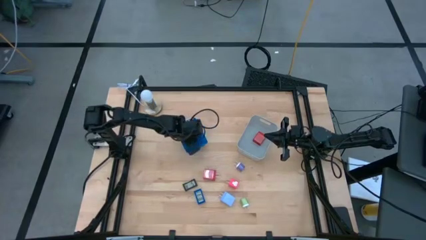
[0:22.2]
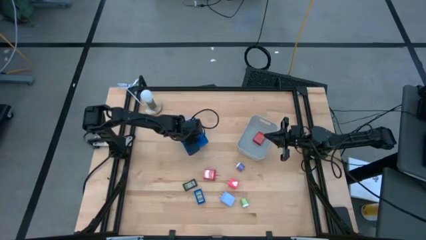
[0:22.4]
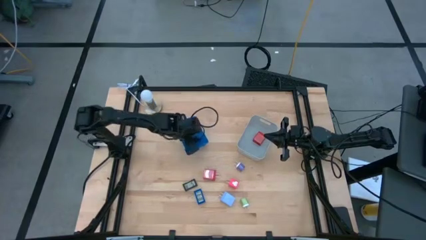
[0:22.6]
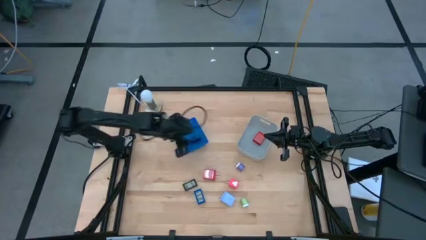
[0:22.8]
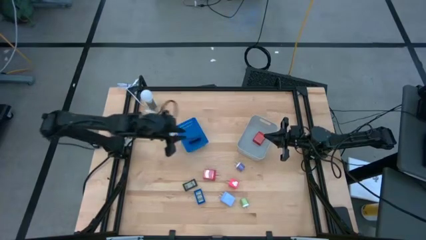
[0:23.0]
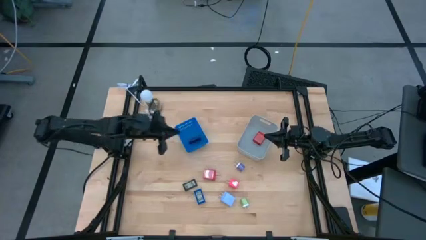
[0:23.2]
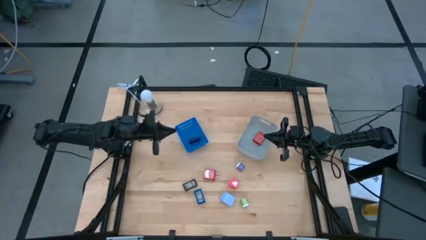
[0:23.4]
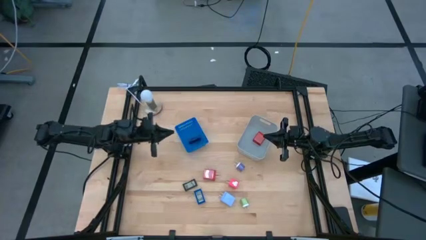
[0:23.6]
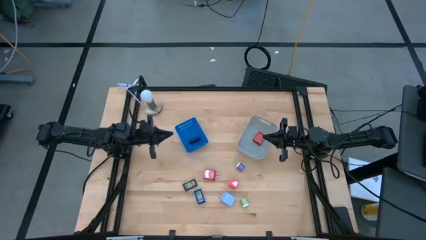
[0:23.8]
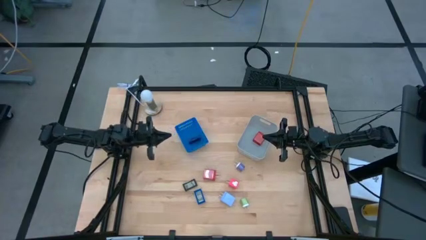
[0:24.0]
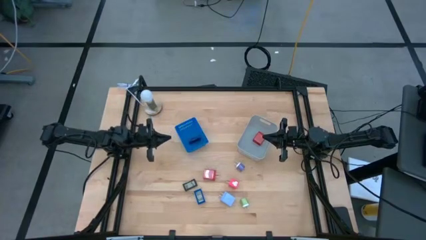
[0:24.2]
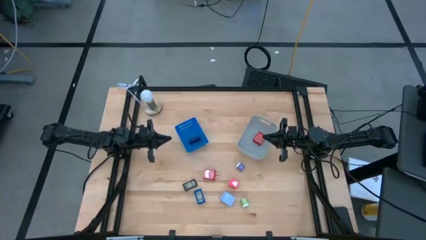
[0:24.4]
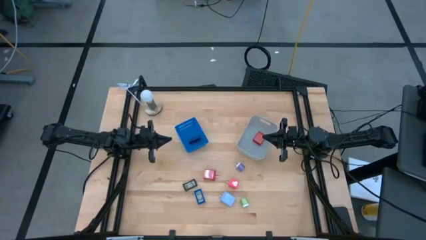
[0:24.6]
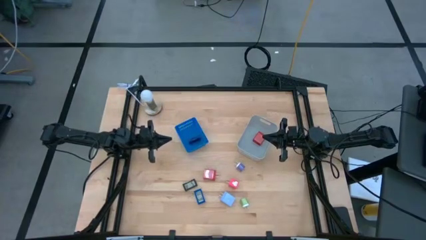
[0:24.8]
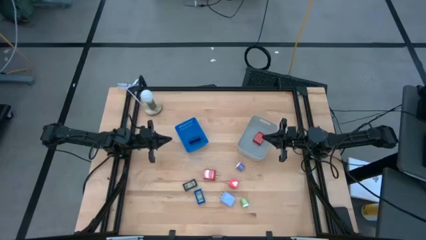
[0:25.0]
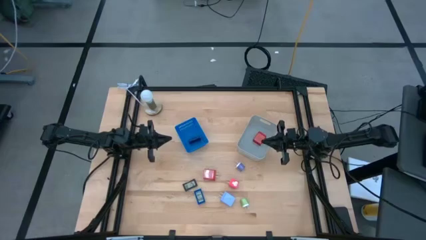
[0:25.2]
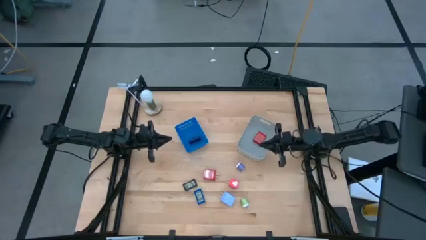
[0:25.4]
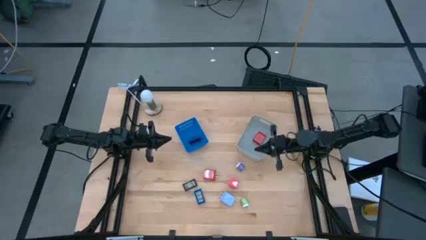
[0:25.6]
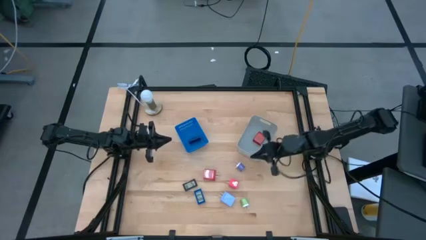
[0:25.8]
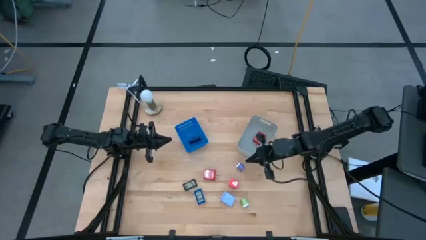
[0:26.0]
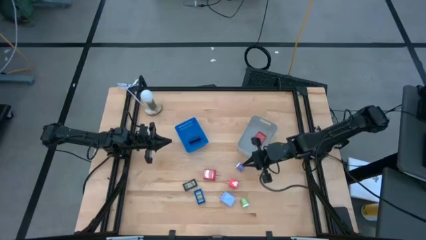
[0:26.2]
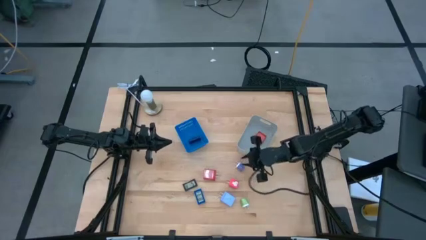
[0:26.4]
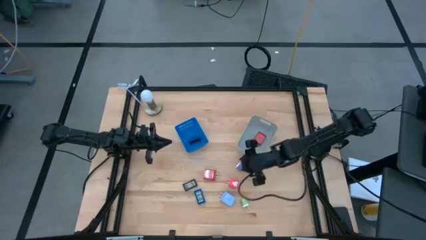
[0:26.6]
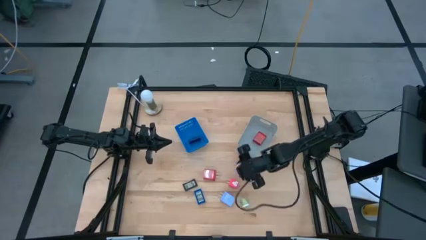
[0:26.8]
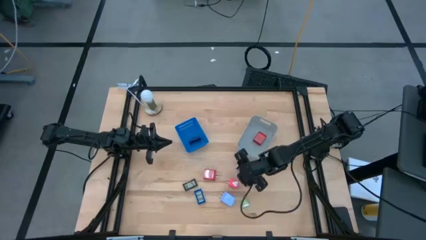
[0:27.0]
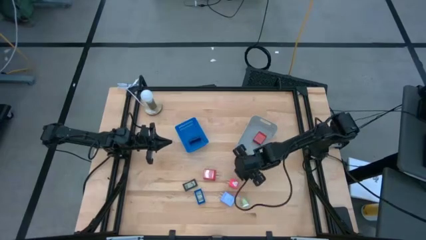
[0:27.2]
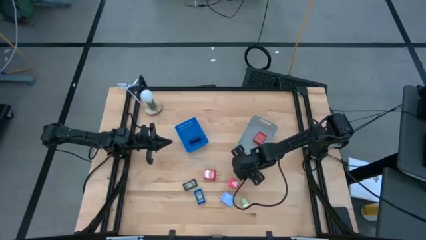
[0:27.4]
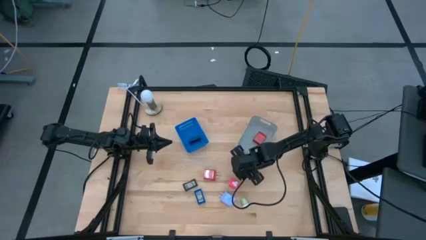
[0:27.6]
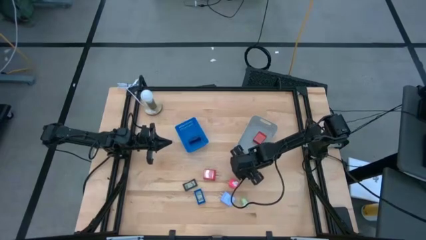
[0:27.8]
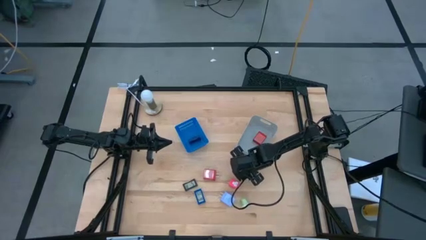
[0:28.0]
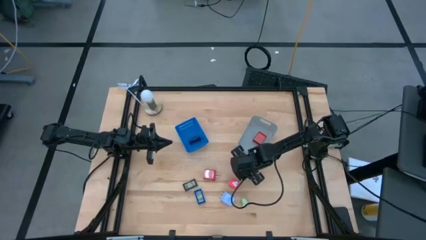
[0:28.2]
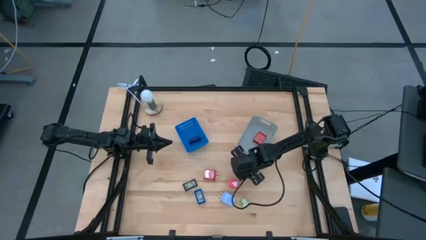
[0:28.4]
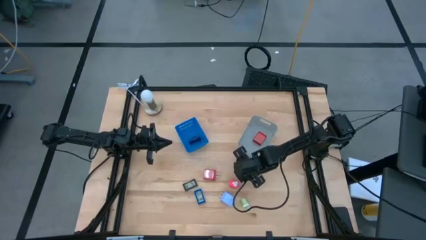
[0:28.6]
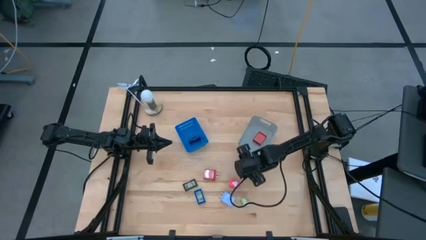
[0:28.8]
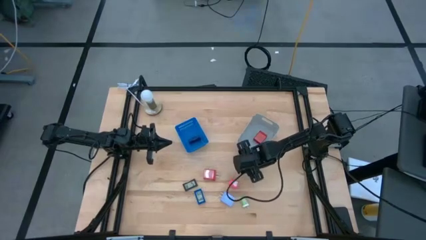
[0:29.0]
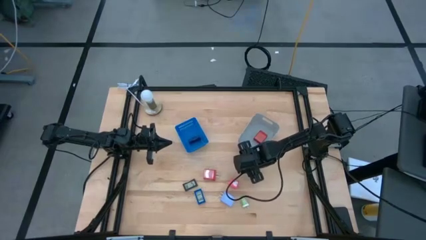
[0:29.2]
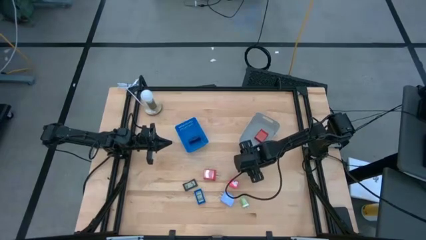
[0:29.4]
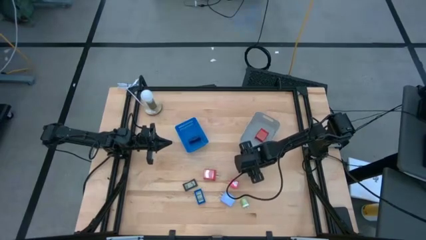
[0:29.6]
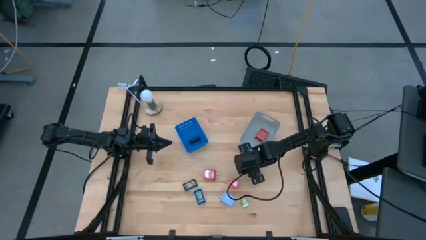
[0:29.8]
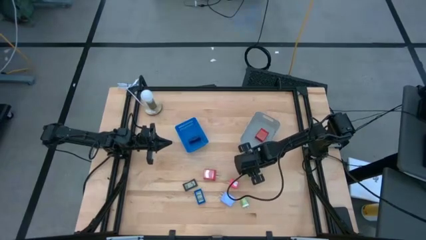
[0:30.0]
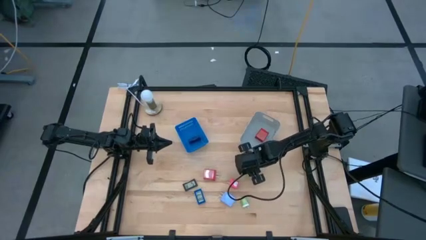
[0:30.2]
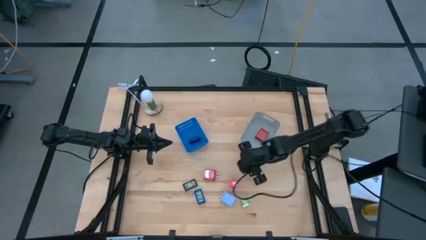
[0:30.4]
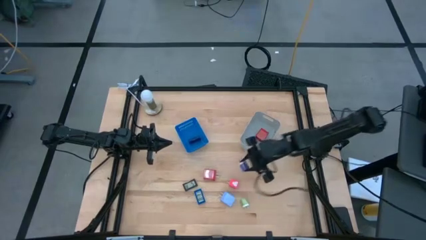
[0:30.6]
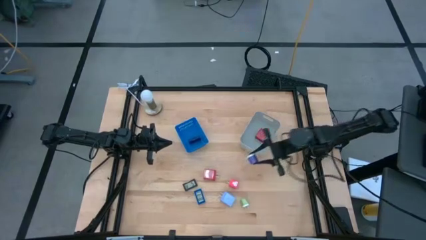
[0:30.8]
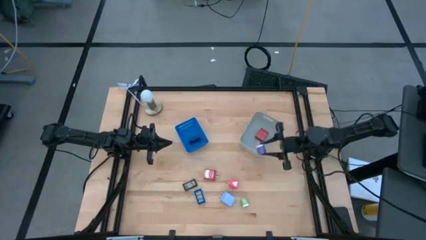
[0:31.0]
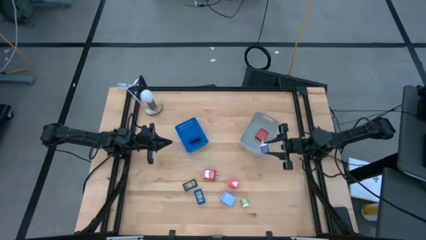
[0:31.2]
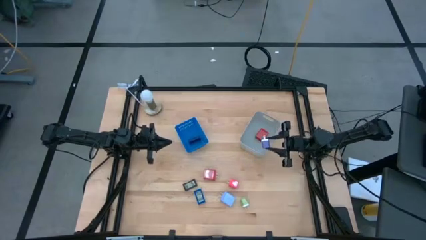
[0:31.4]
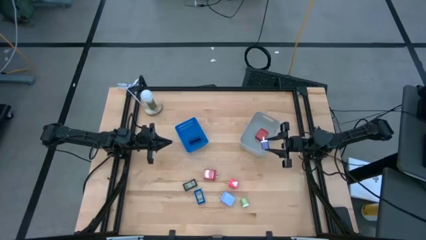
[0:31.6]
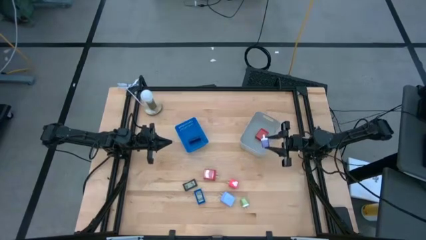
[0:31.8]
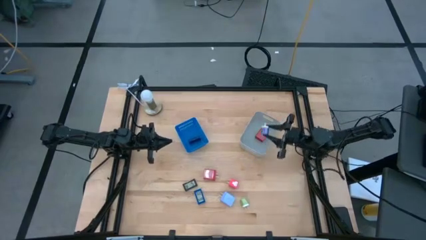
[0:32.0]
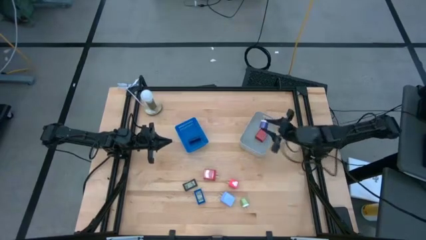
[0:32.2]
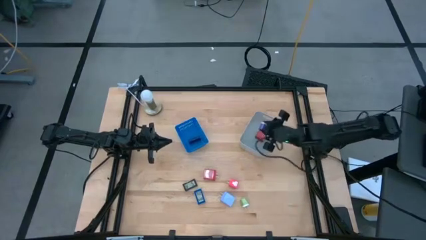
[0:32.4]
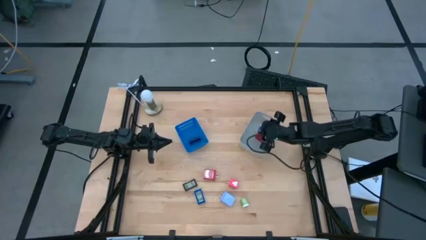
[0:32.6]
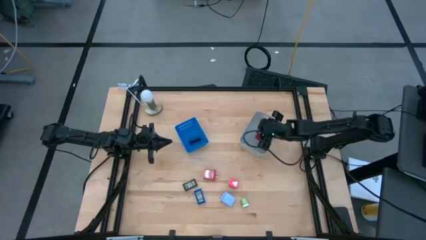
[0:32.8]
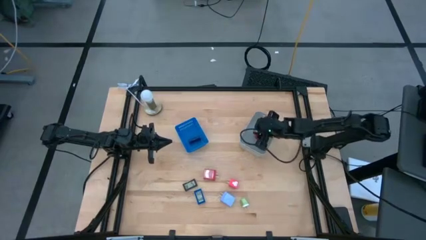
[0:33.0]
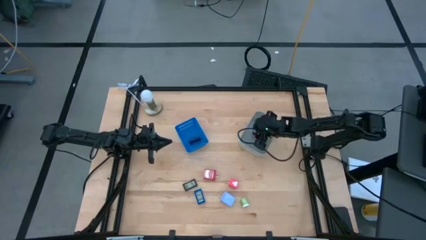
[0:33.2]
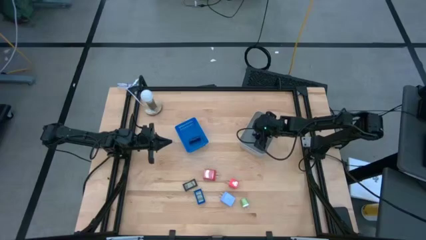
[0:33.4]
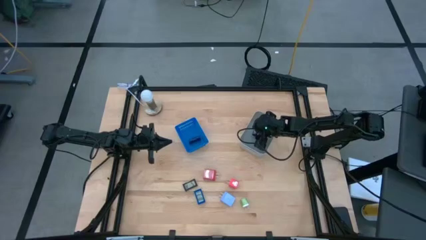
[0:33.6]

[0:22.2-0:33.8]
Task: Pick & Place Office items
Put the violet charger adapter into the gray bin

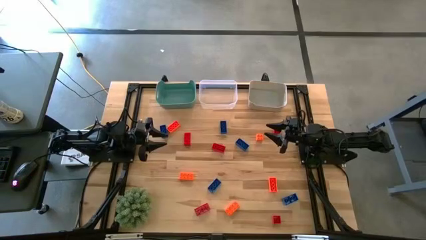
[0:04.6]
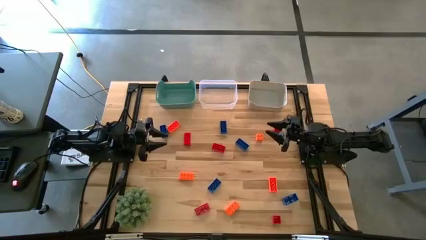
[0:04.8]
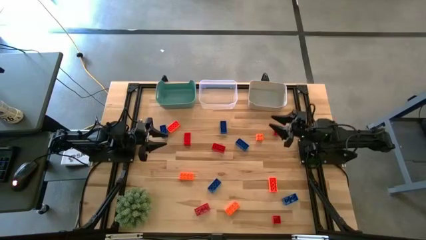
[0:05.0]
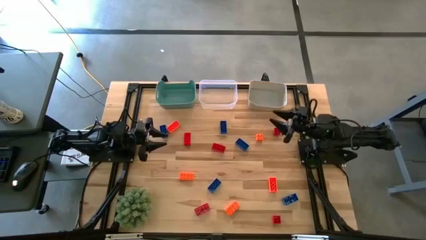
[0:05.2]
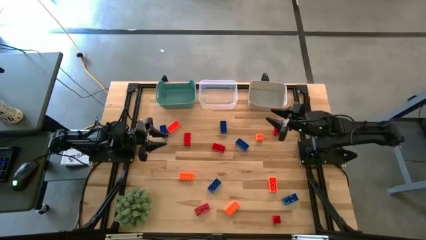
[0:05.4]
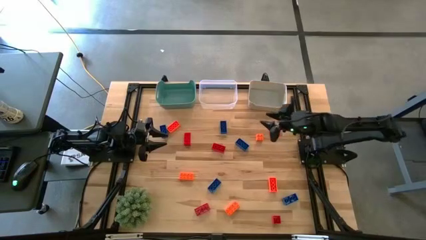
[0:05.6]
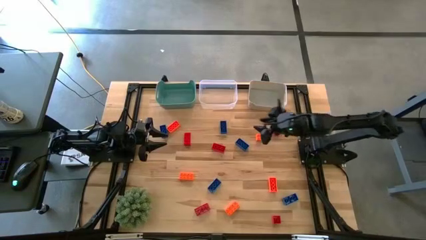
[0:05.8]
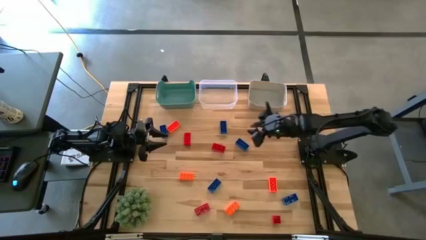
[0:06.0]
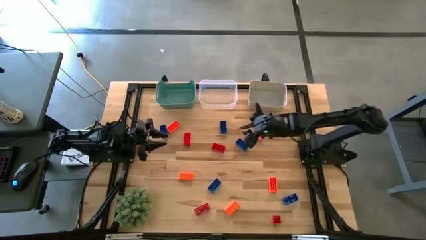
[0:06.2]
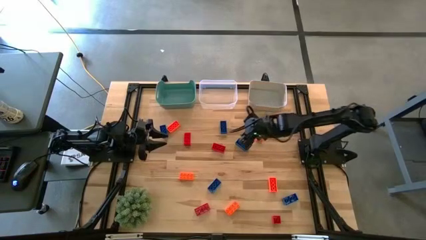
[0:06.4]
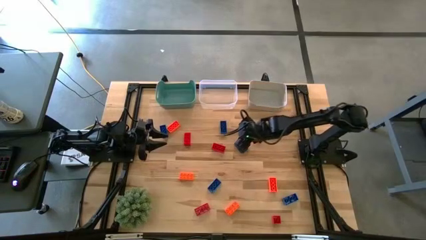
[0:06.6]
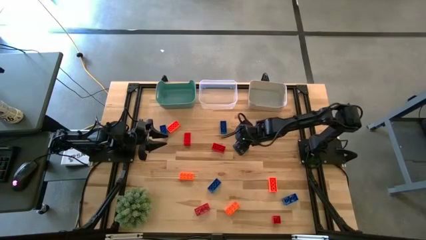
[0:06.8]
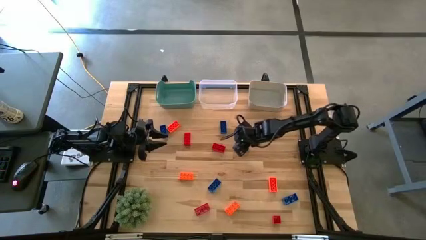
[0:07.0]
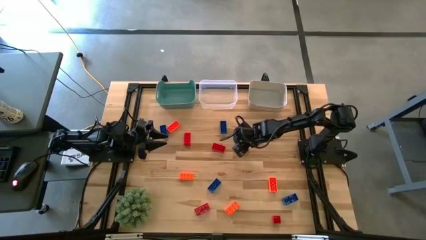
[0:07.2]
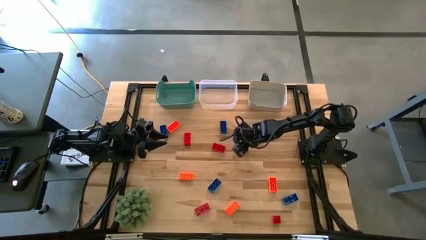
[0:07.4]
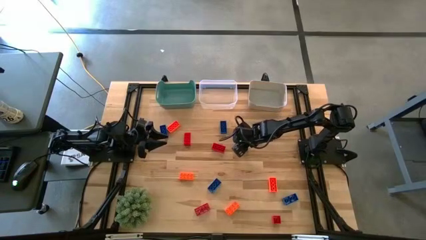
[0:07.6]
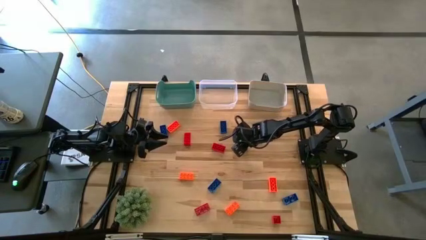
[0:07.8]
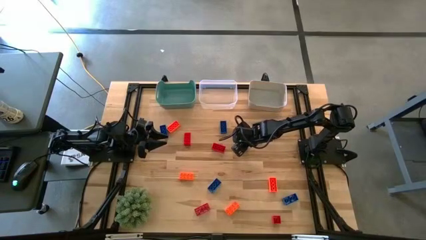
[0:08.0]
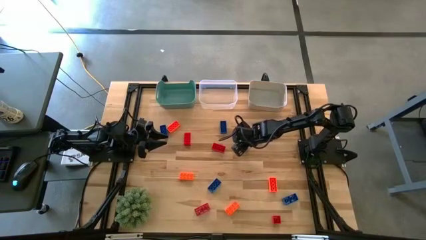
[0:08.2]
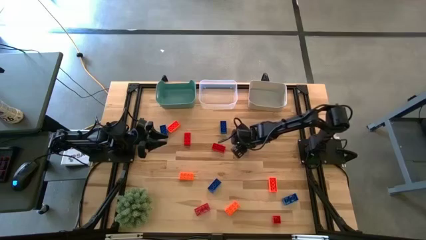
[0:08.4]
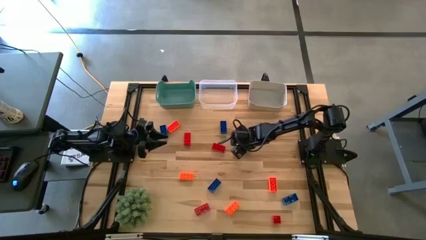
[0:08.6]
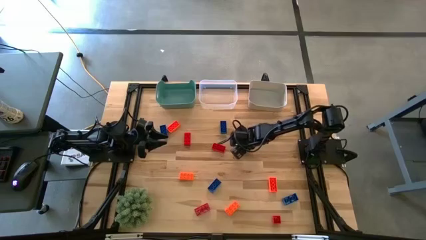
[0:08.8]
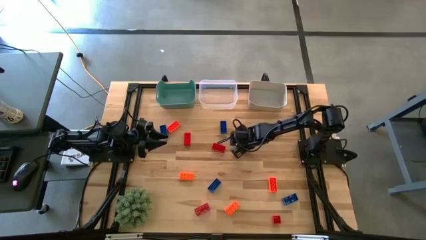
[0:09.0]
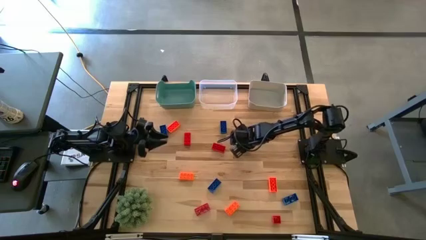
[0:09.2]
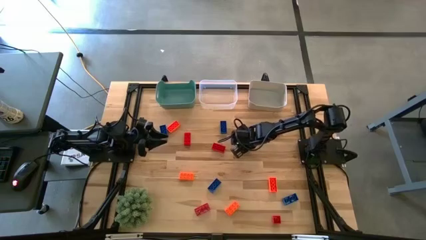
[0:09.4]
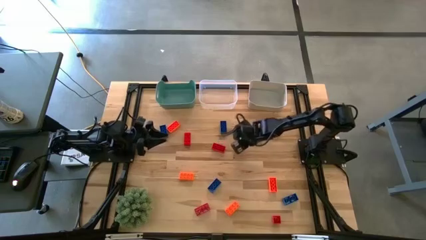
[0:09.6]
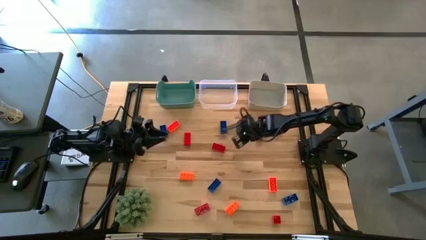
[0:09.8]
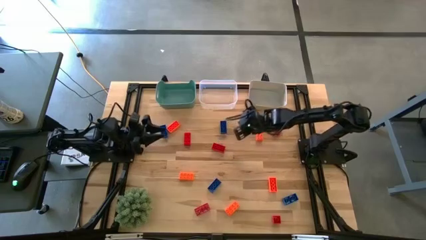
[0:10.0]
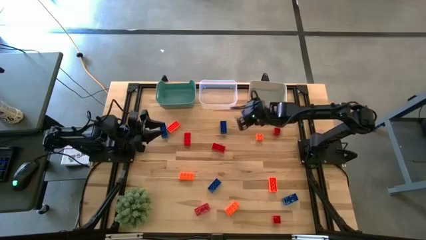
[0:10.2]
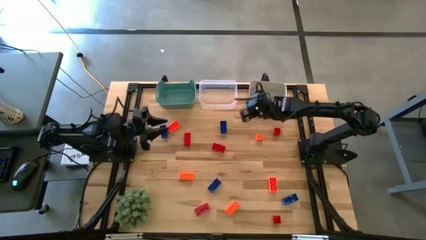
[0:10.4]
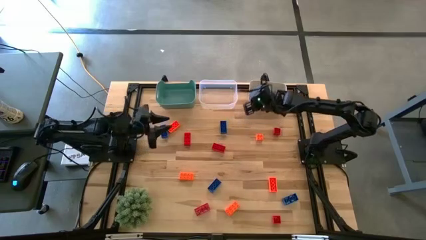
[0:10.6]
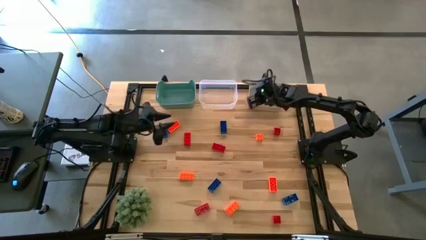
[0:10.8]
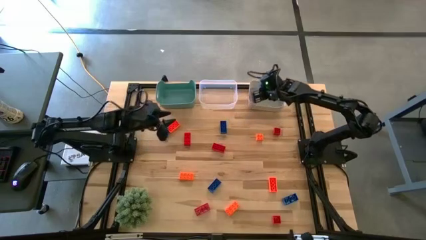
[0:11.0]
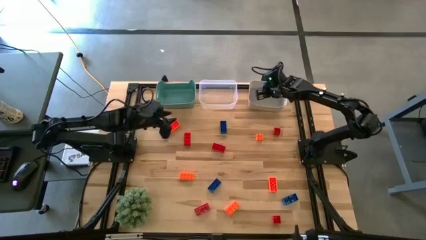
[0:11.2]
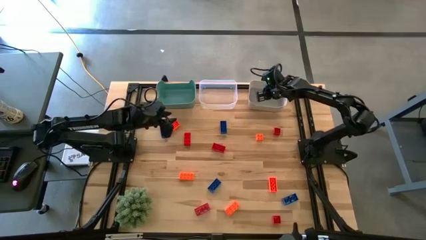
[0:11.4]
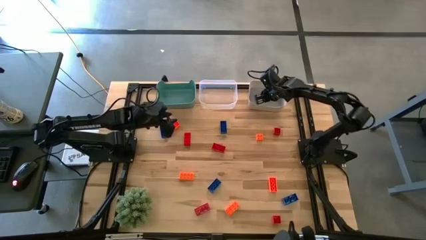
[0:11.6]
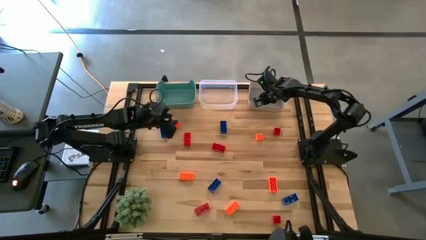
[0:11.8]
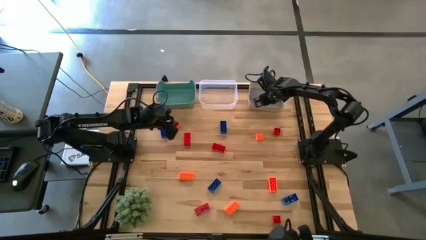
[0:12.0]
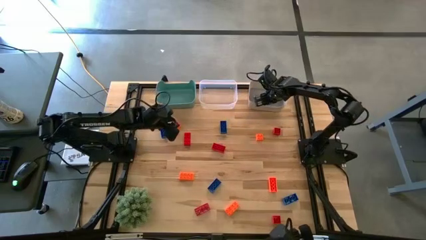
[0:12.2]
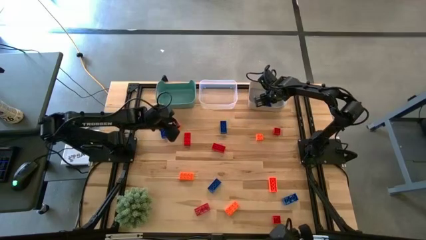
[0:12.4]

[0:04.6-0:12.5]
Task: Sort & place blocks by color
Put the blue game piece into the gray bin
